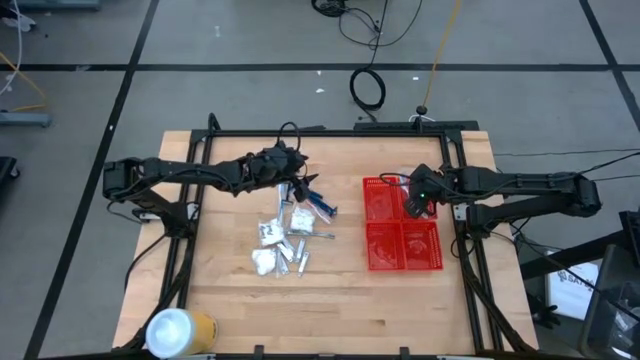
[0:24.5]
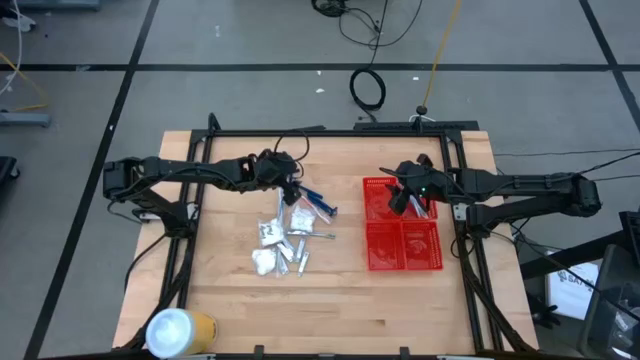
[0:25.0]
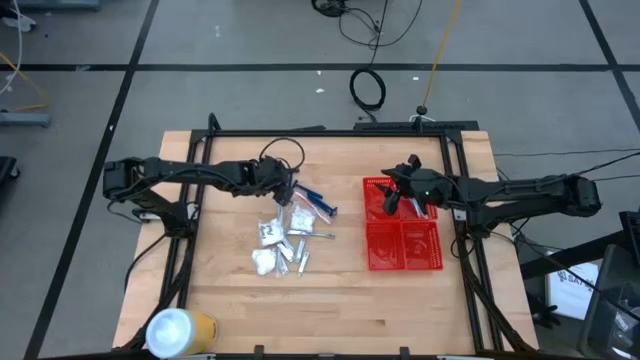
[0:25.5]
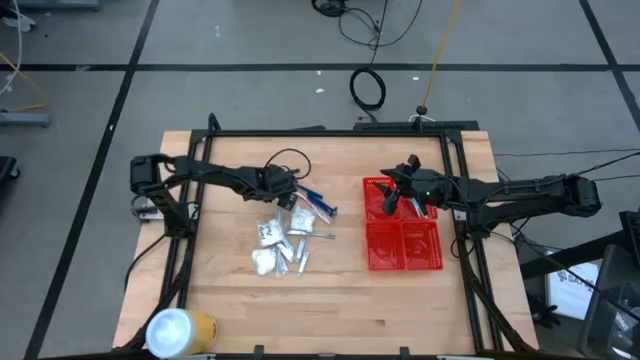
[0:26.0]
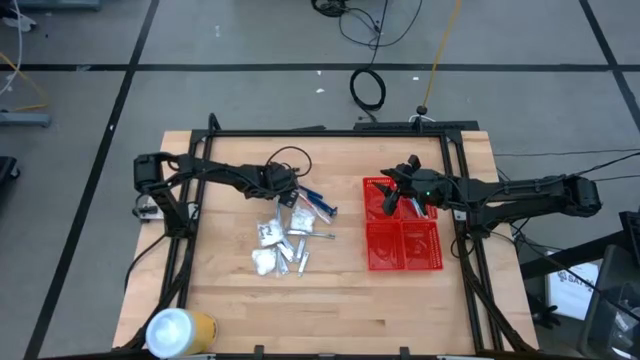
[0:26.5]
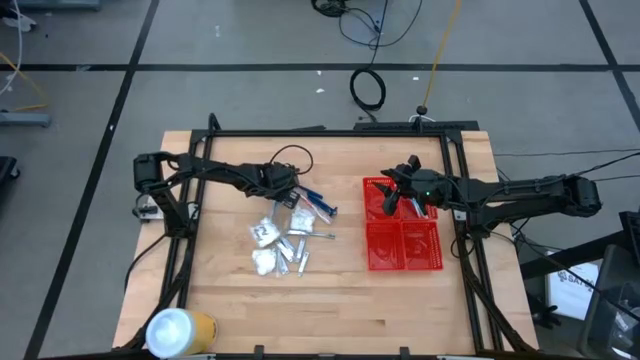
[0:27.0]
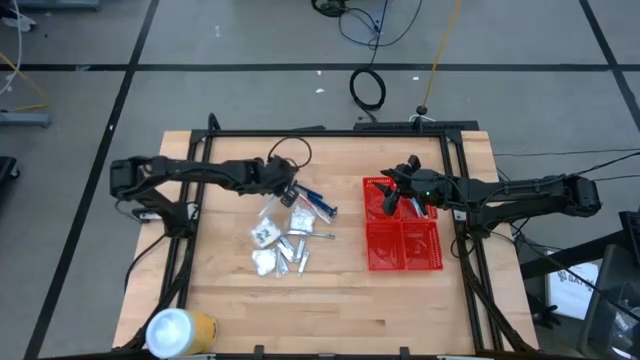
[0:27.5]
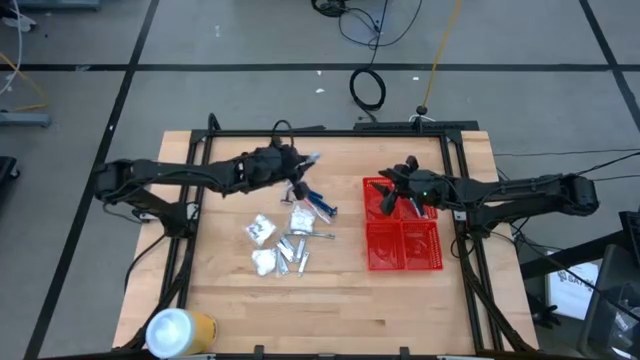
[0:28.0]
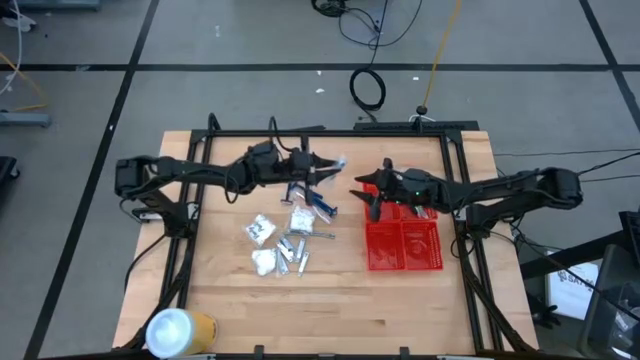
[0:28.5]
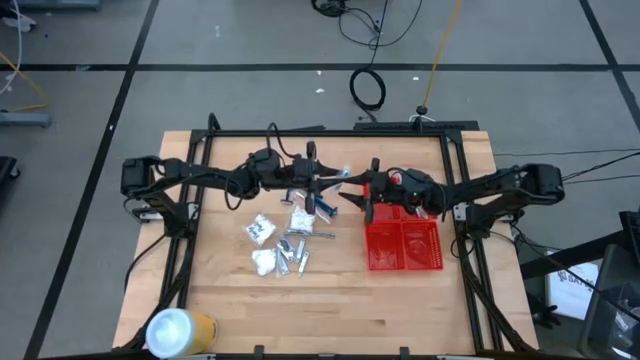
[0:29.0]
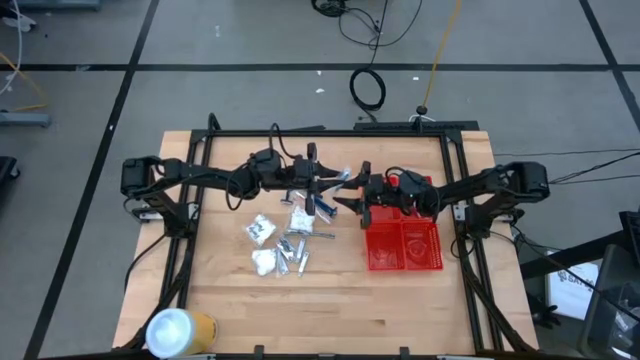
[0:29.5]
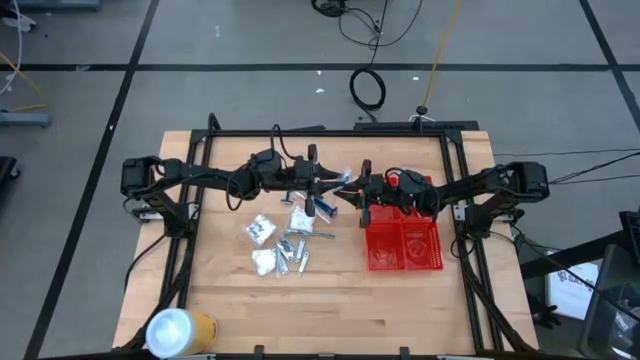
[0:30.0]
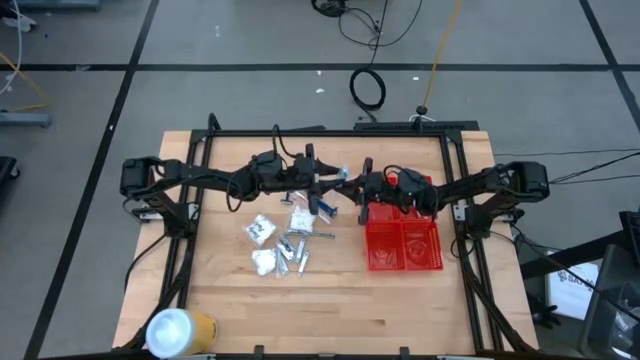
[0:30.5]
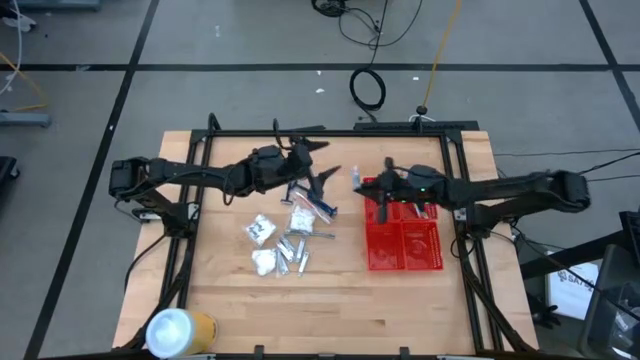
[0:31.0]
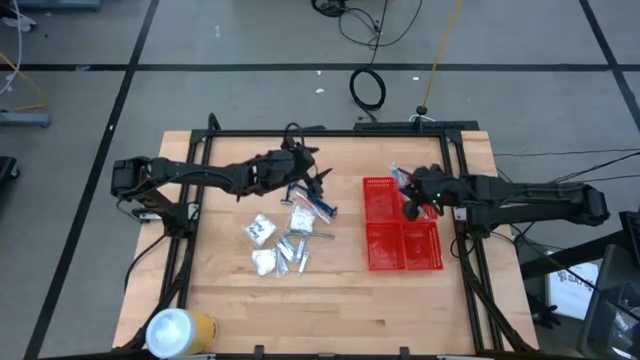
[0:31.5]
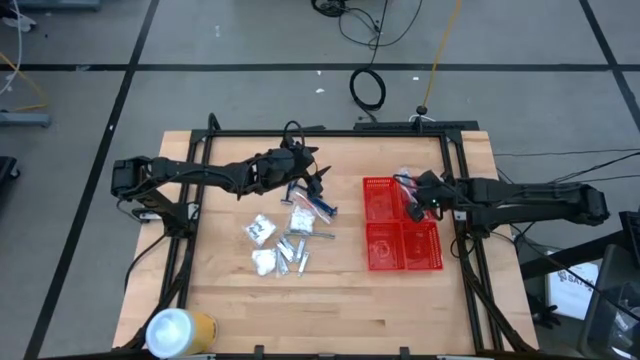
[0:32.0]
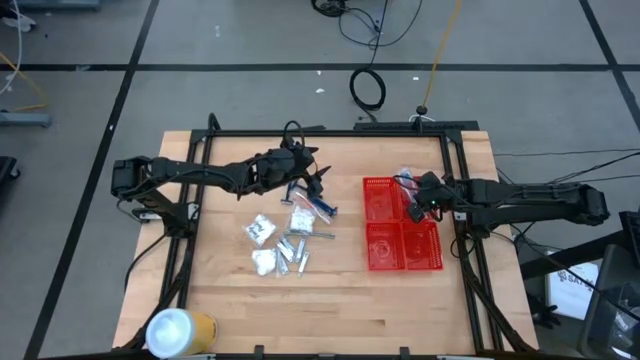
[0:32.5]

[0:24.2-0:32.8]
Task: Pick & Place Travel size toiletries
Put the blue toothbrush into the top right red bin

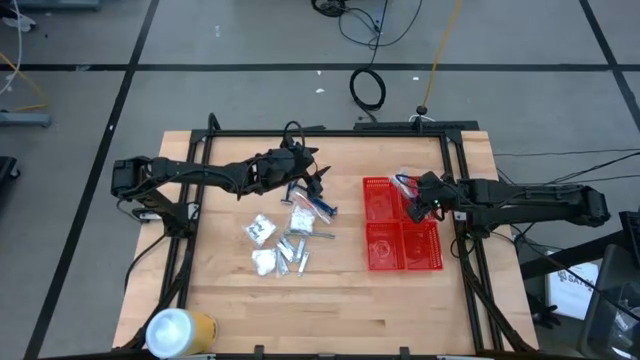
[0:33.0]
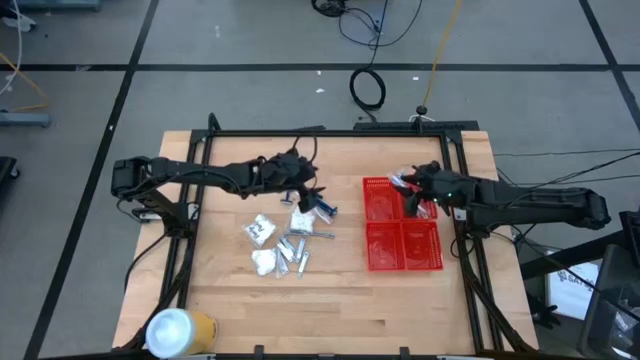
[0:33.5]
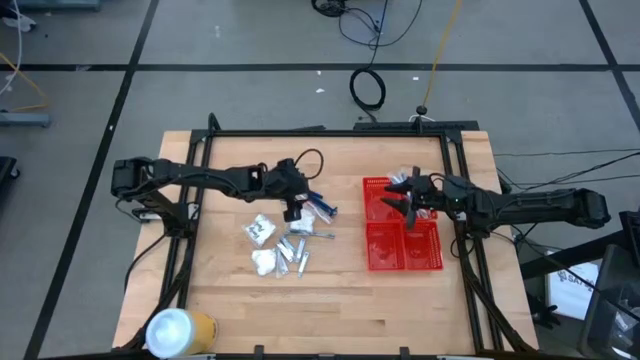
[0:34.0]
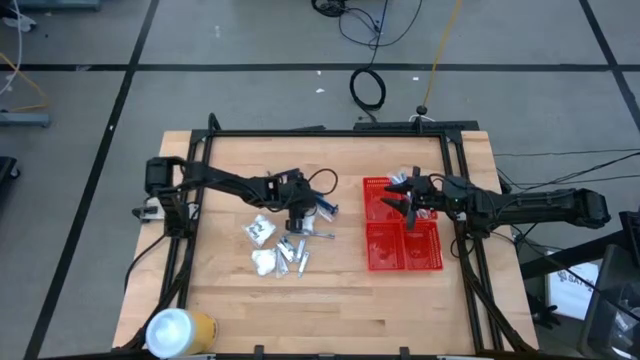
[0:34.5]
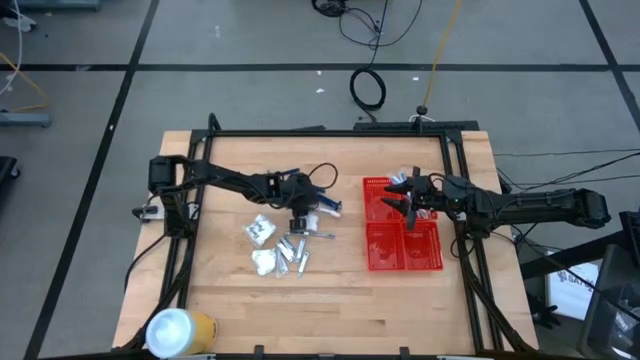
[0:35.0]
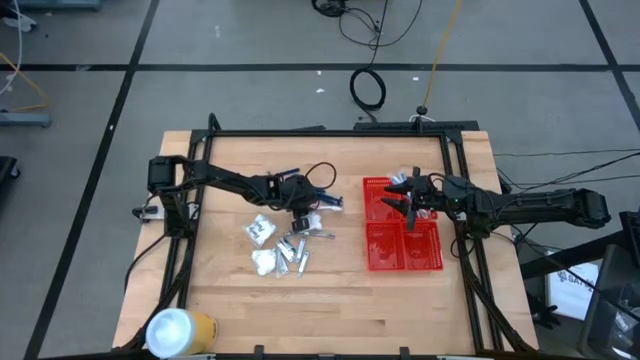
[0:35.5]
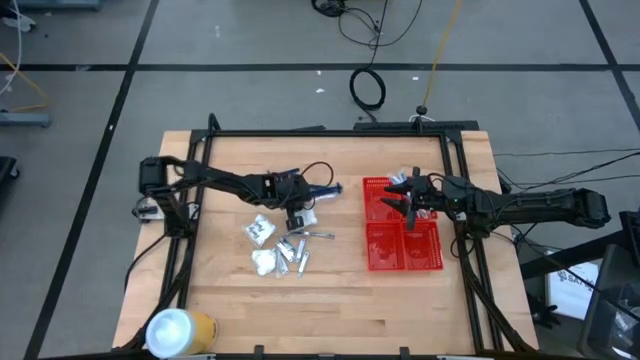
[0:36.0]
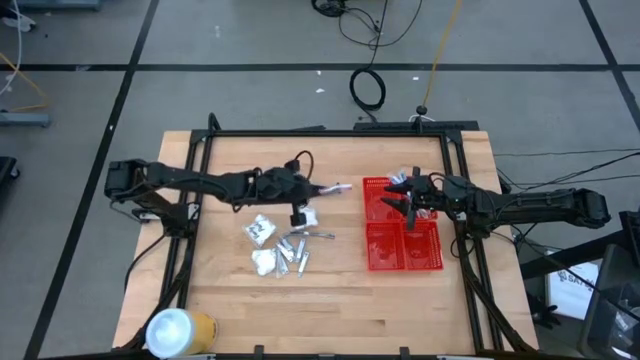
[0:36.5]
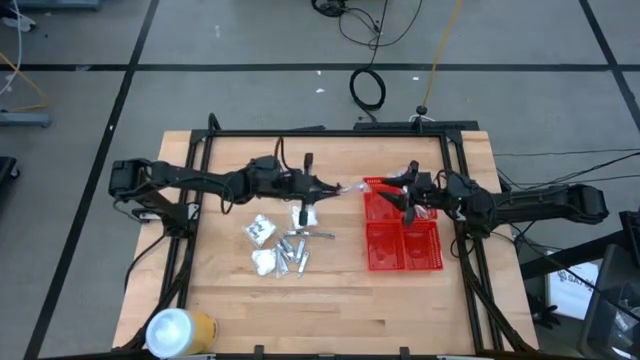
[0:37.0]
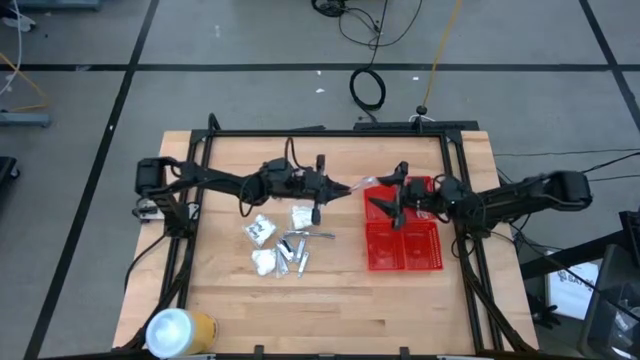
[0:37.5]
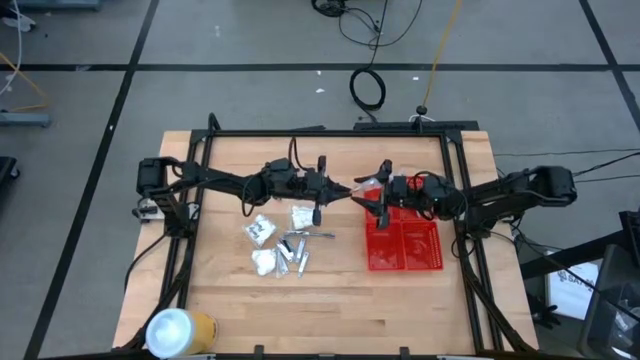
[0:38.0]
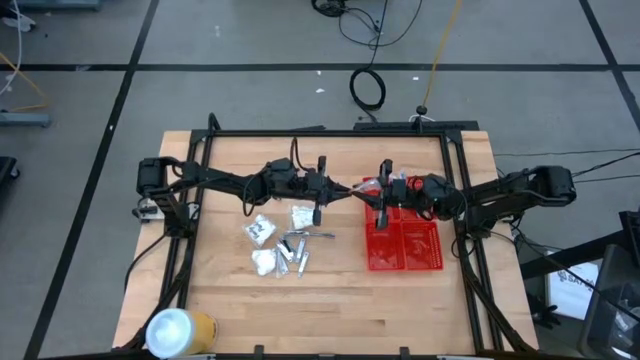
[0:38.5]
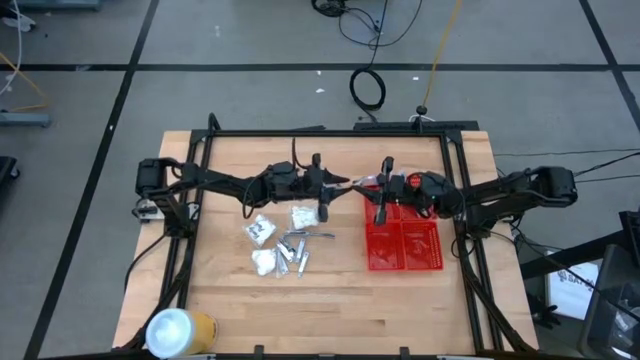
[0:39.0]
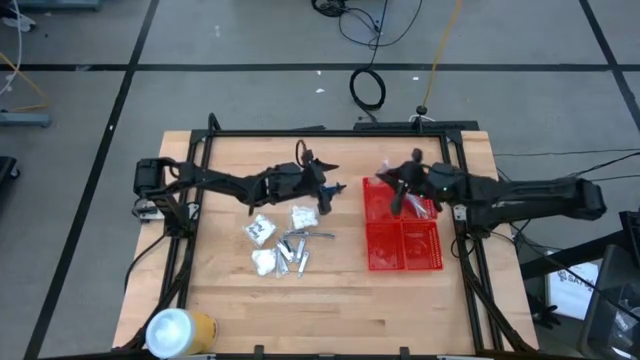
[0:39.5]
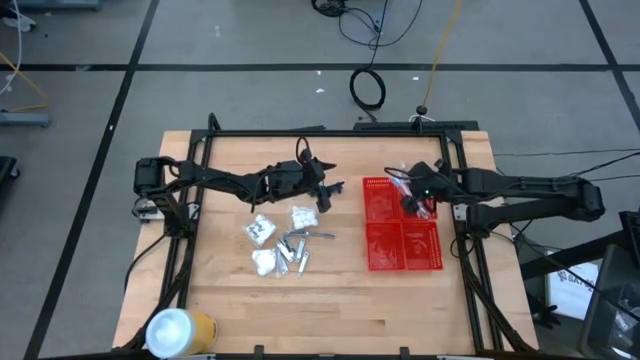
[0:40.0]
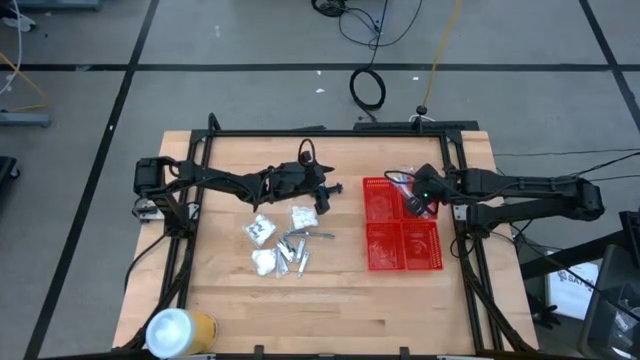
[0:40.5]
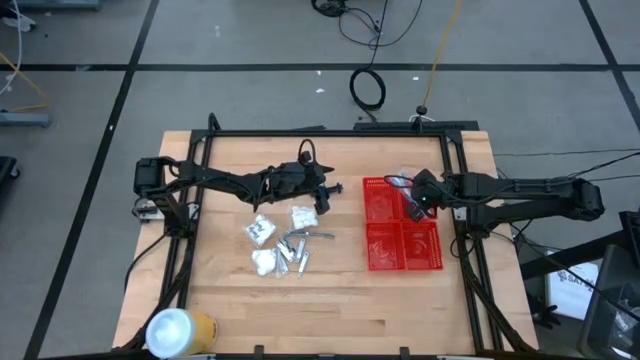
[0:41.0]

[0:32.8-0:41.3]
Put the red toothbrush into the top right red bin

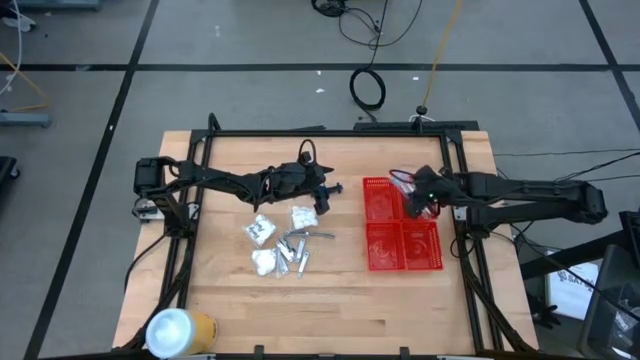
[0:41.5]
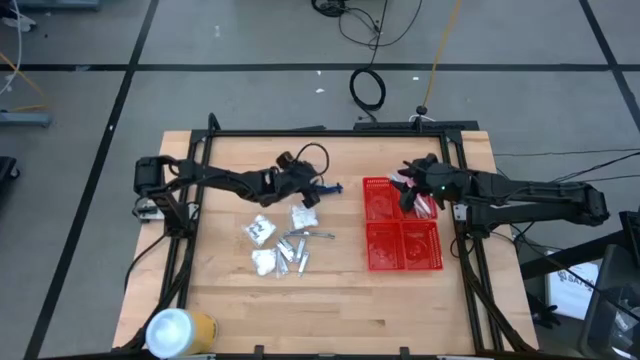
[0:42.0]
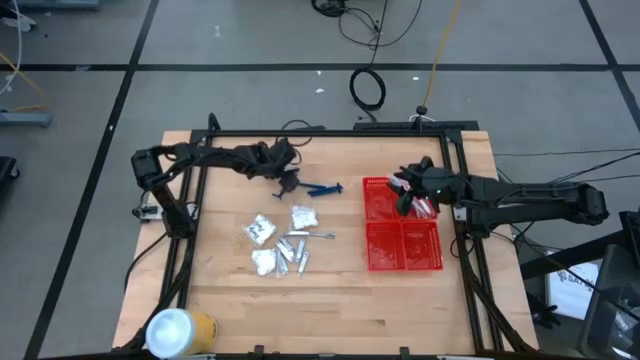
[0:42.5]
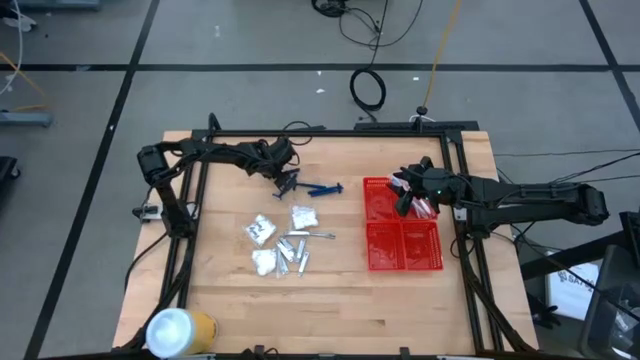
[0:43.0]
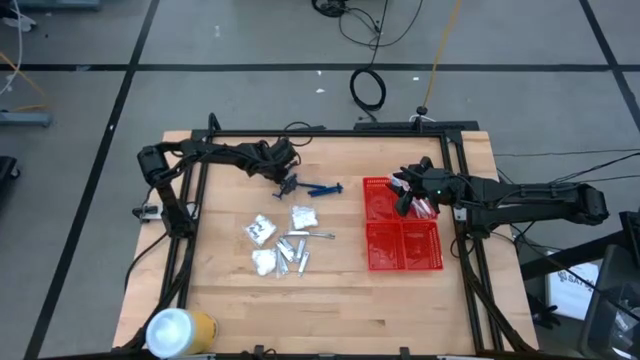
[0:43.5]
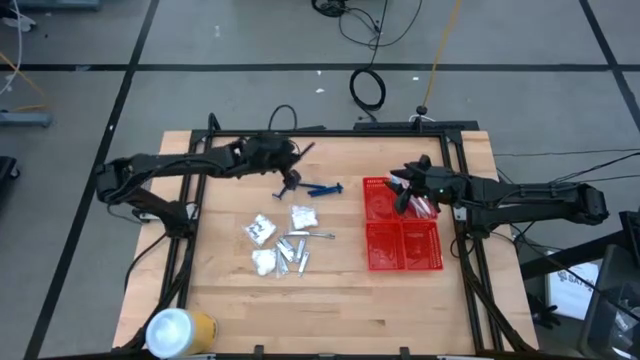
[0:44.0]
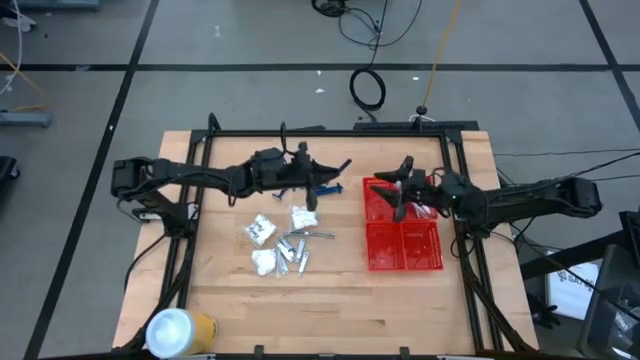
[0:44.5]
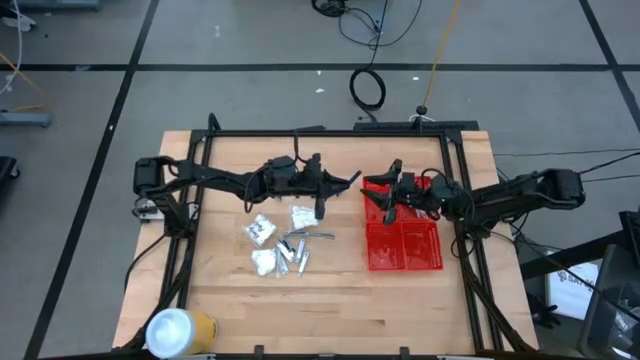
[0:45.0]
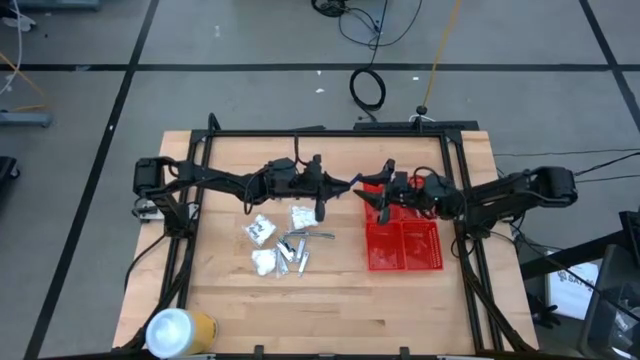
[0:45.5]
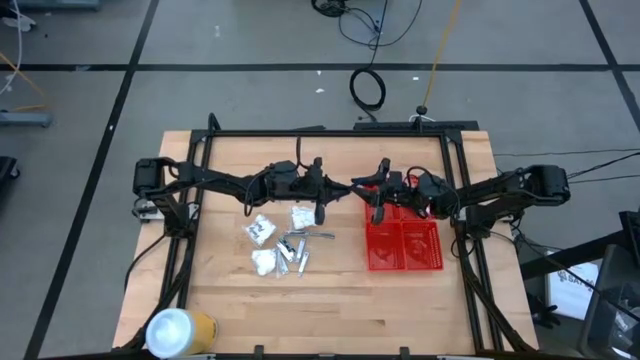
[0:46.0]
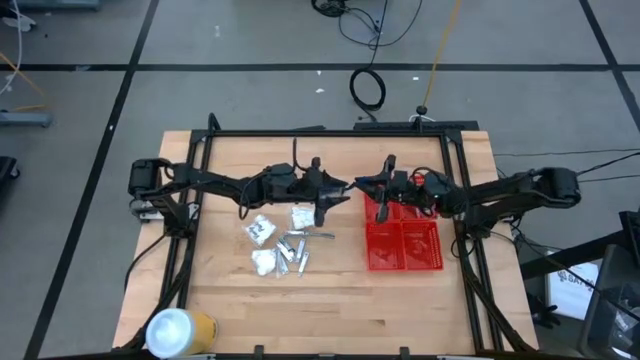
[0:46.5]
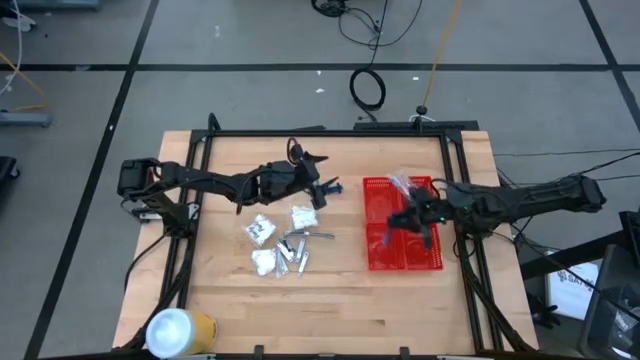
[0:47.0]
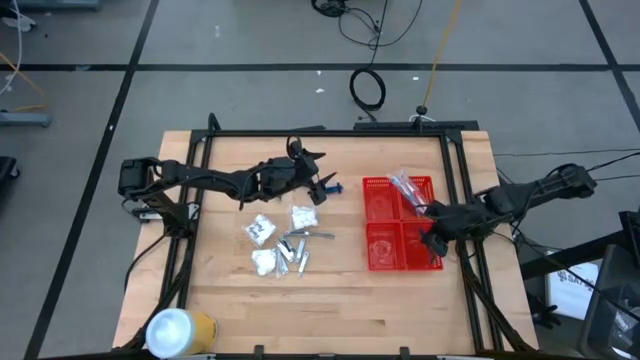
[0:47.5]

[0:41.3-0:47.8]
Put the razor into the bottom right red bin
